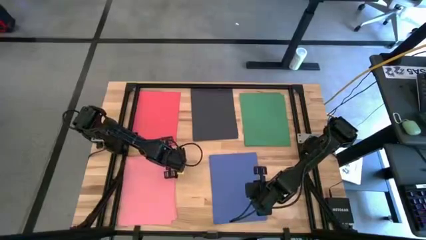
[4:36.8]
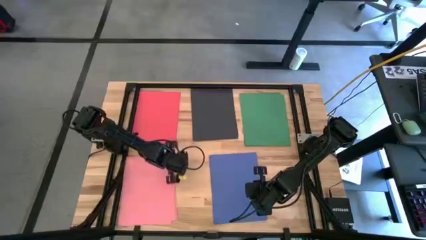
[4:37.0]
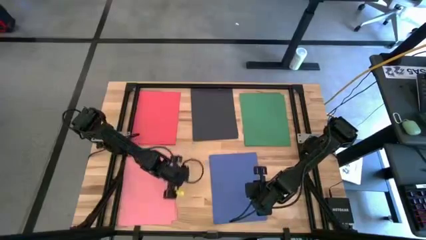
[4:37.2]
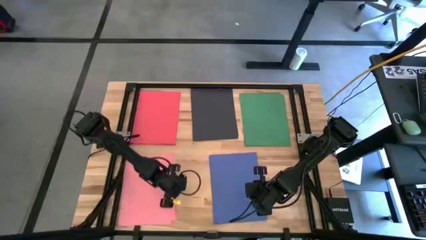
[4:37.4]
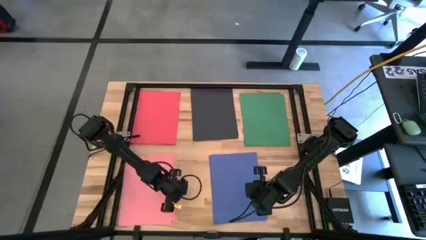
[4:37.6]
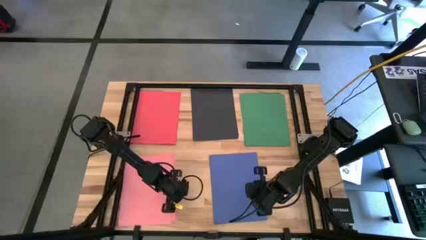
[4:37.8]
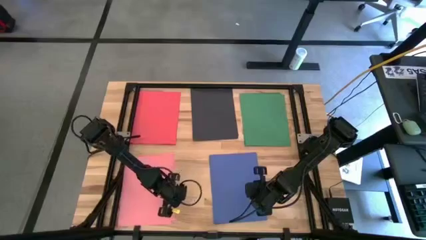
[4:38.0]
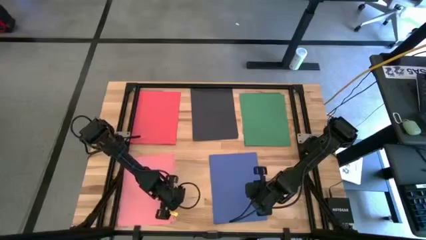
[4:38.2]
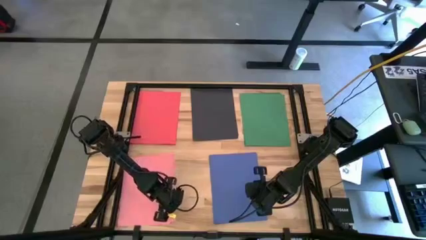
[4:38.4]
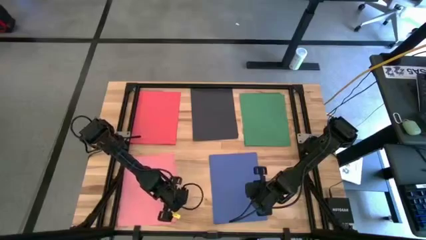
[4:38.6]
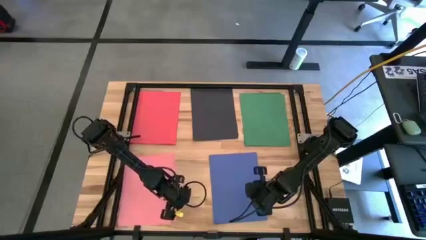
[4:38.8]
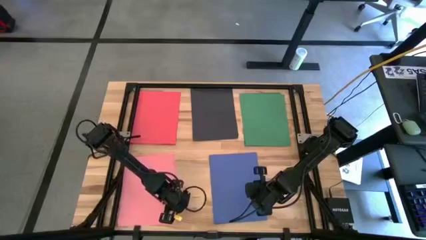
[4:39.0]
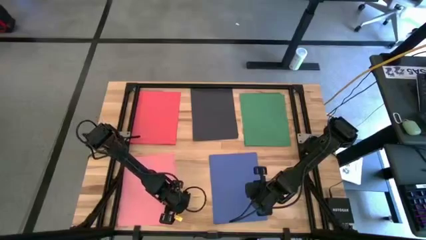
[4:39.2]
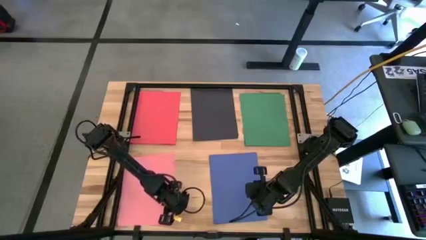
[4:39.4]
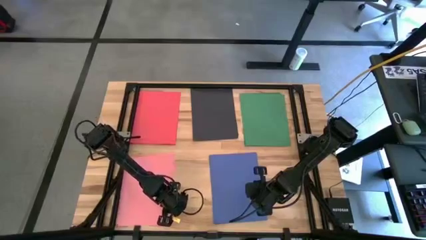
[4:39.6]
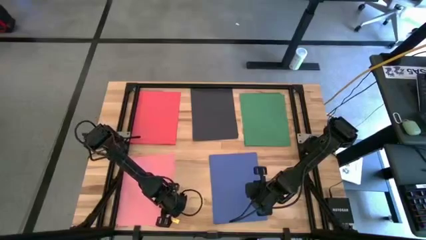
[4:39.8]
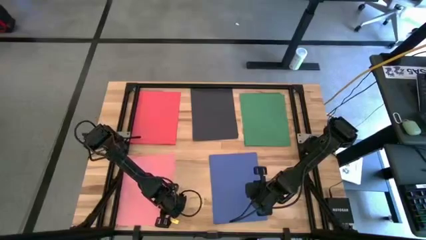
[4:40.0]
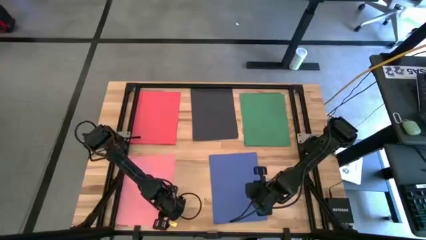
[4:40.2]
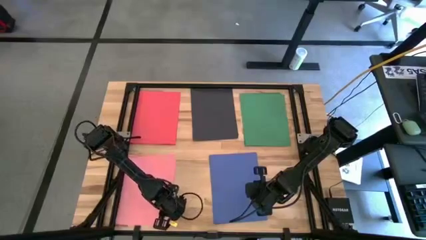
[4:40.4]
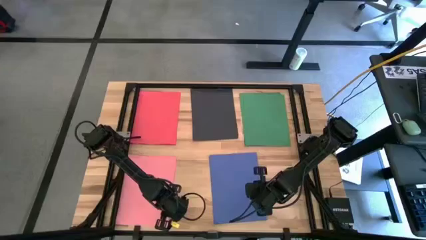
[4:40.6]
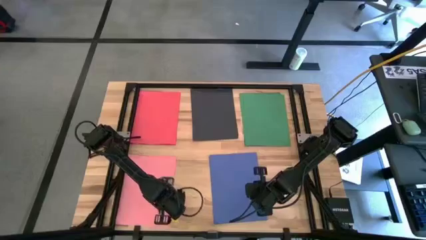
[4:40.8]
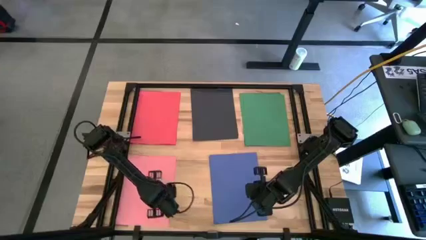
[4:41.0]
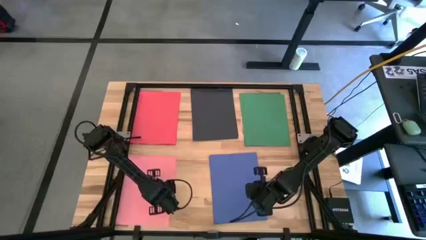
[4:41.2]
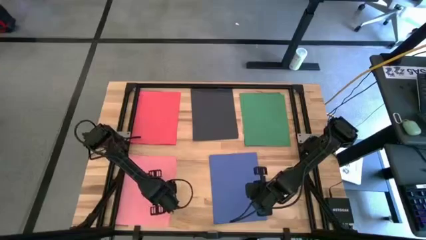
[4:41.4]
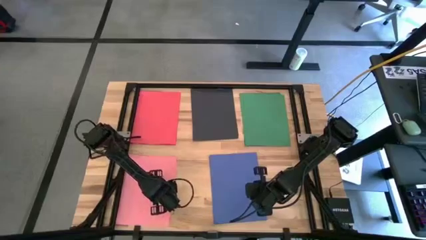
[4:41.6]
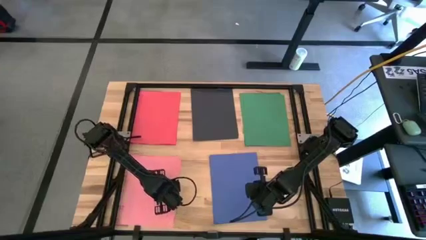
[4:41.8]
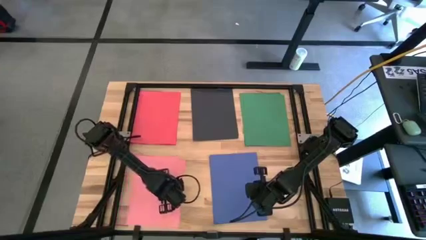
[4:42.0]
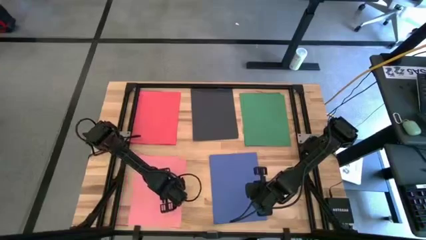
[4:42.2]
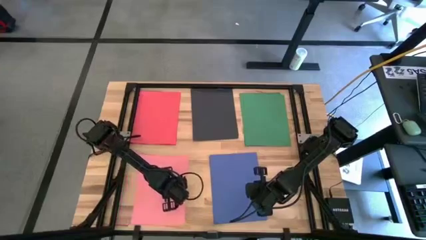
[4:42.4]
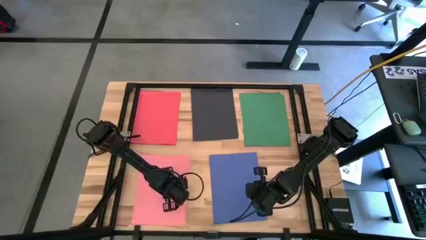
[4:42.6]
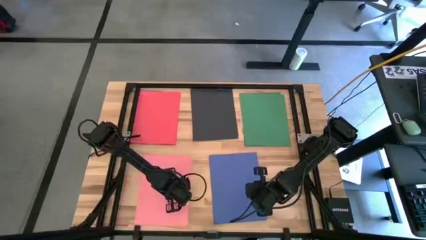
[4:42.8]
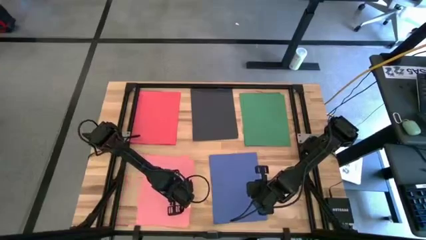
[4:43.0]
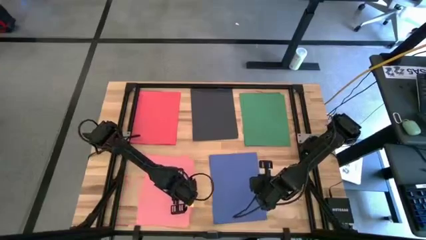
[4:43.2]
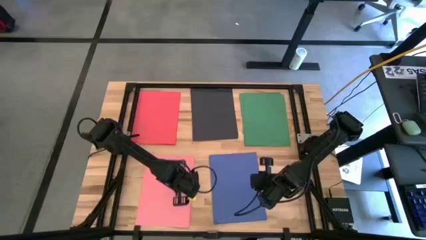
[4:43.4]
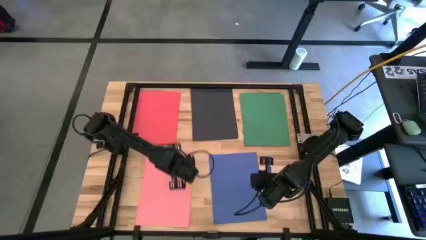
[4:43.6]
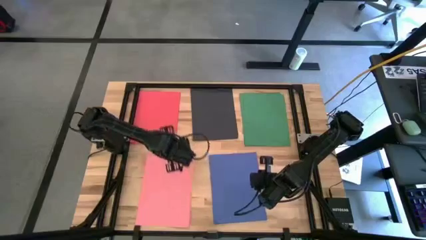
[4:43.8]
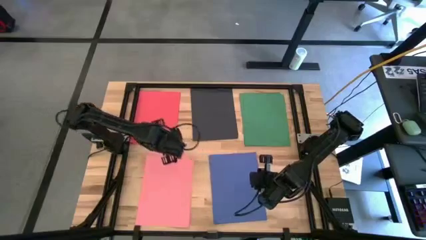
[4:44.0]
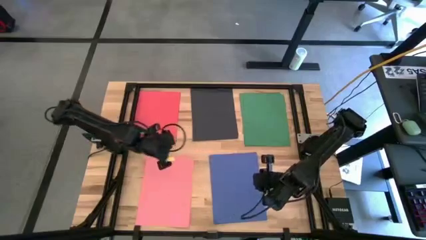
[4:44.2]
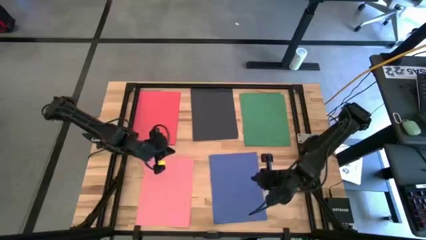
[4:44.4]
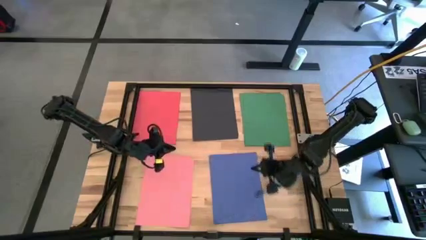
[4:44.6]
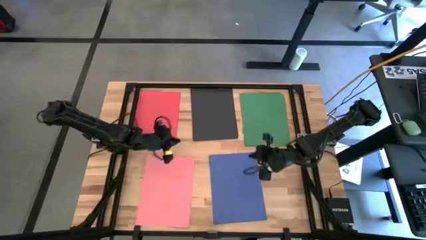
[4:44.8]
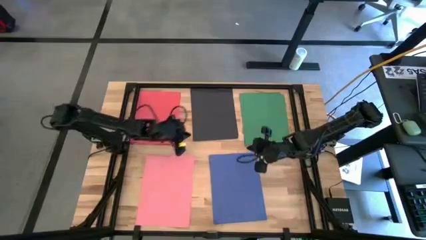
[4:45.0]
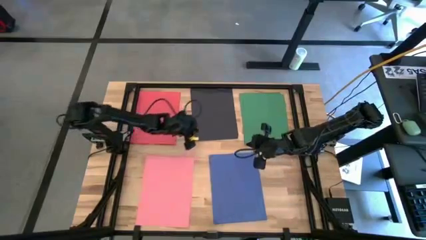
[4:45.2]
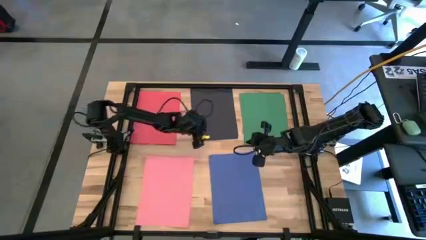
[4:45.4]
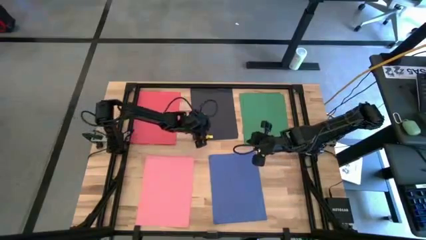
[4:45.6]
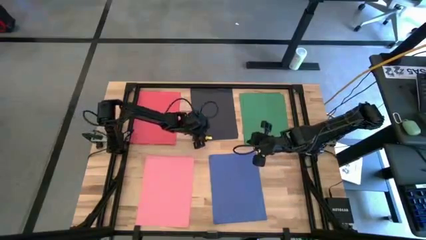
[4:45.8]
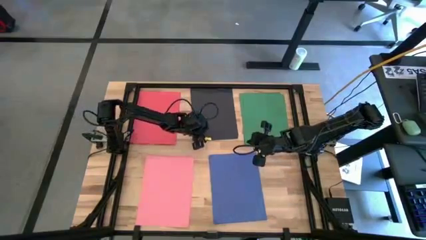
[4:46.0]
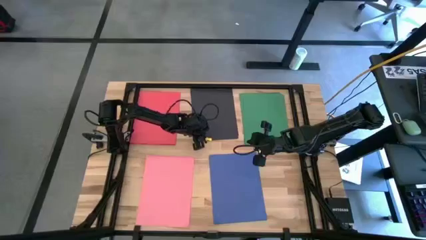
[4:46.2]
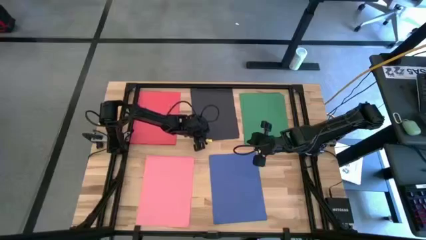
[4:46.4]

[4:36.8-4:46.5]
Task: Organize paper
Adjust the stacked pink papers

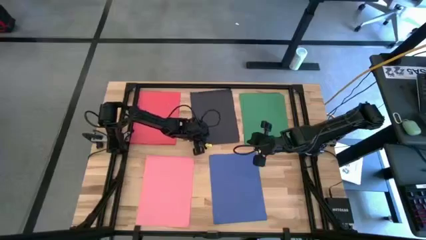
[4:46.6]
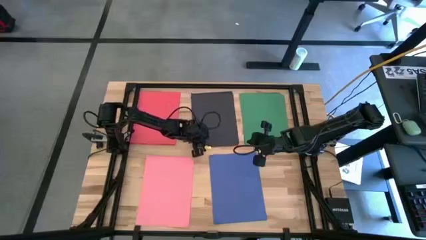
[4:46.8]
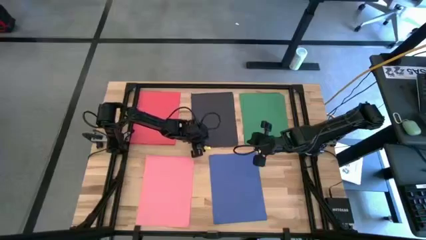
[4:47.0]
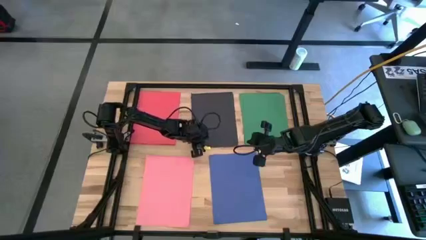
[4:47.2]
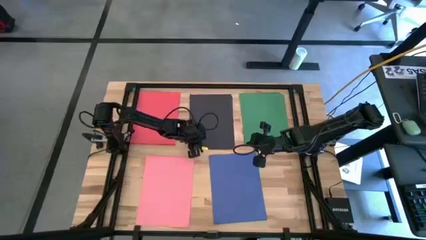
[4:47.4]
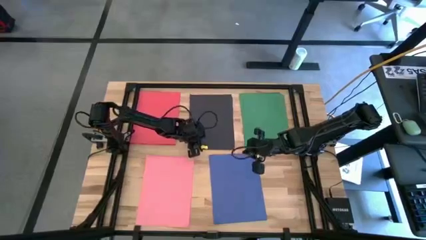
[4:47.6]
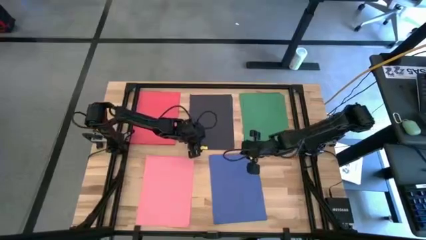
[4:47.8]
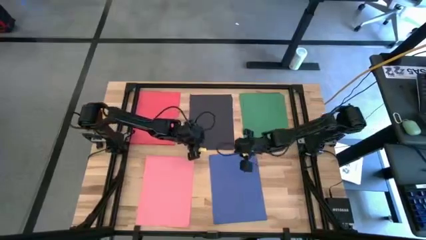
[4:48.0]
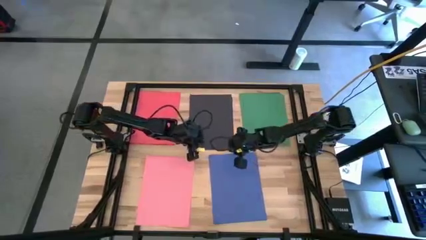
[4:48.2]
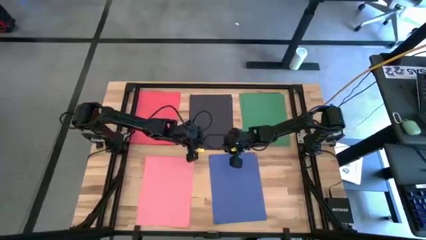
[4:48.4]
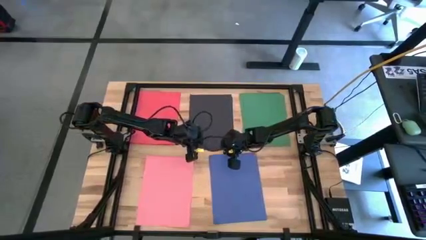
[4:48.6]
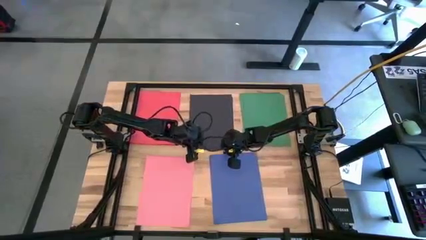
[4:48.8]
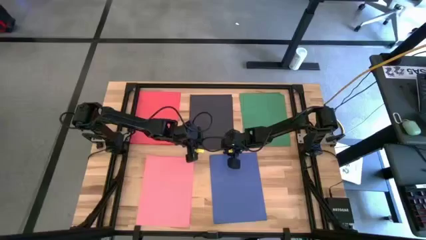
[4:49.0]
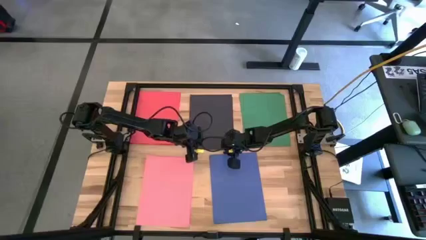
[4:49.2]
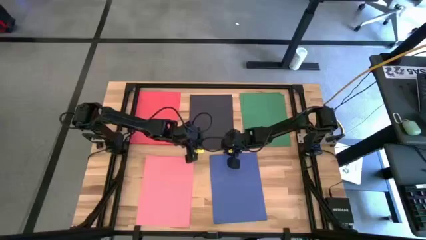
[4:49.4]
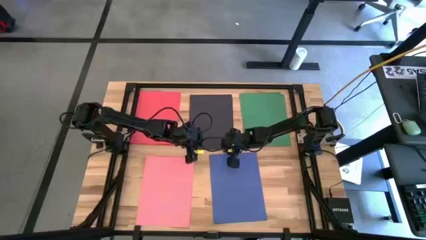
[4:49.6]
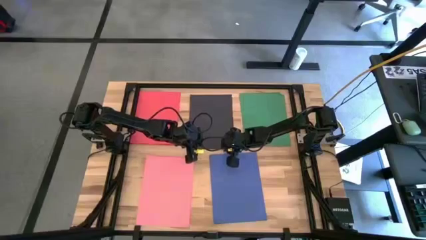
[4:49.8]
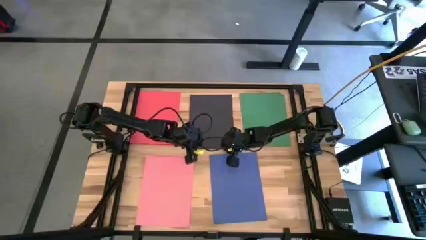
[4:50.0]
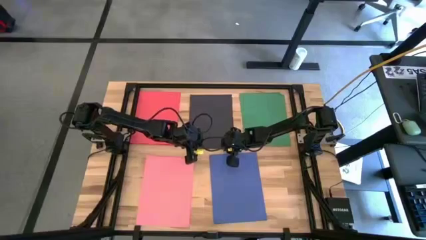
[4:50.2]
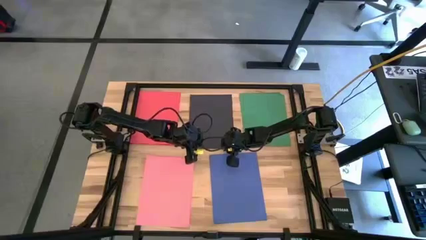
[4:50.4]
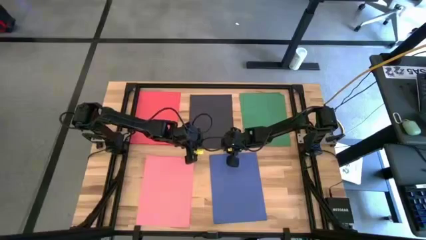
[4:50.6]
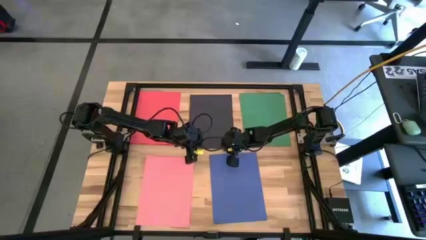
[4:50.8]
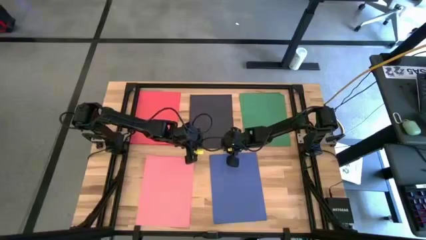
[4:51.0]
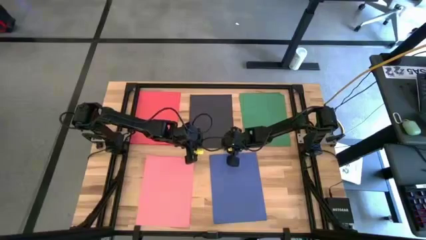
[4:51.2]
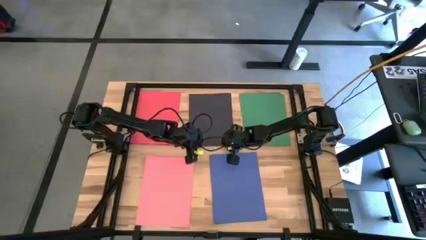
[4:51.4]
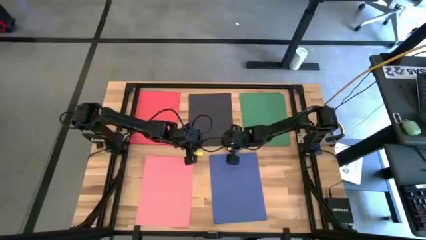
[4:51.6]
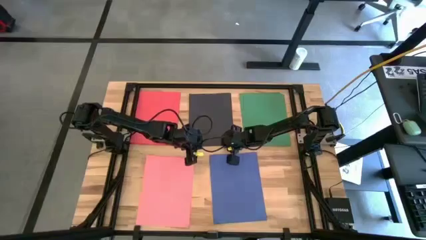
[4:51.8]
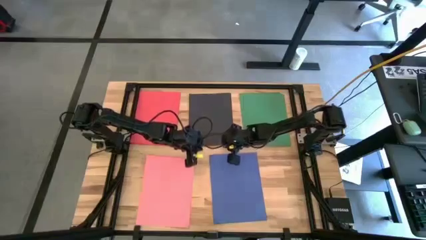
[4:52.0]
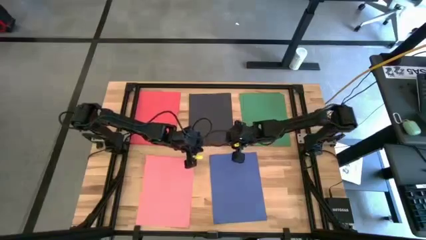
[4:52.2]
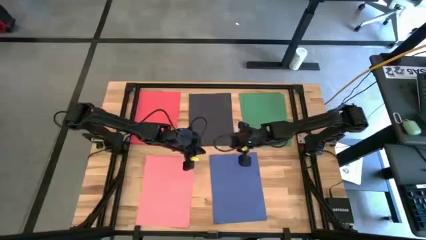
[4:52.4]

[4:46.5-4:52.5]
Adjust the stacked black papers
